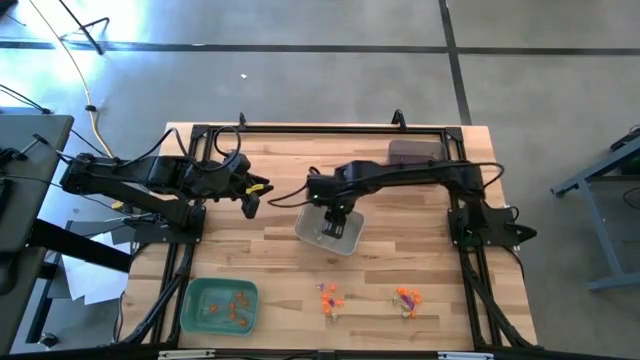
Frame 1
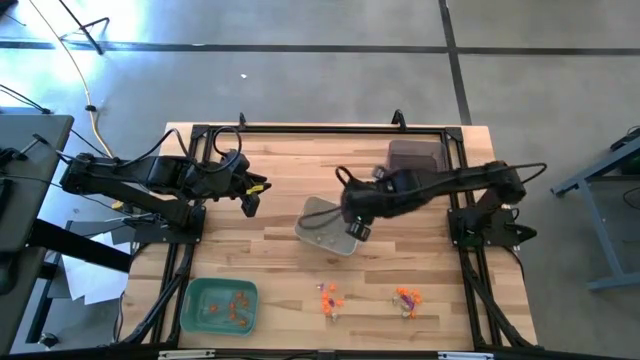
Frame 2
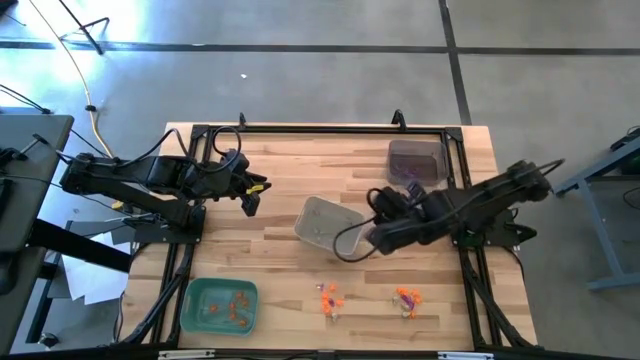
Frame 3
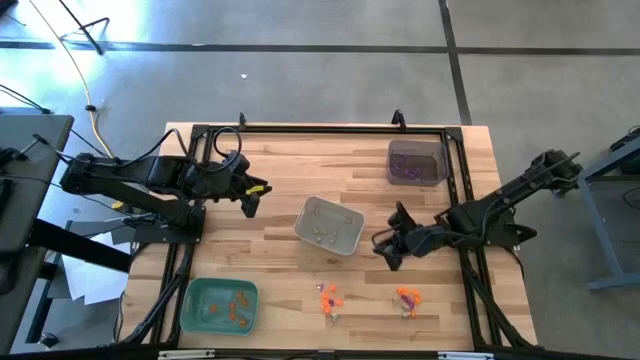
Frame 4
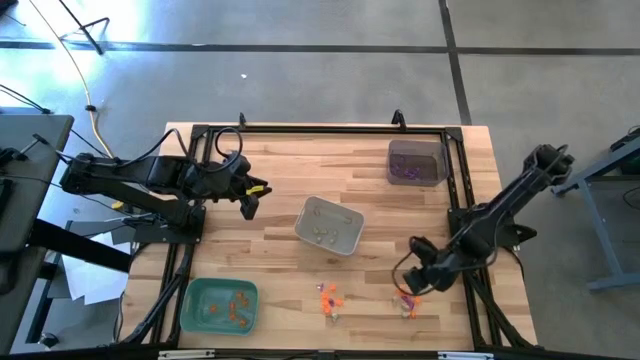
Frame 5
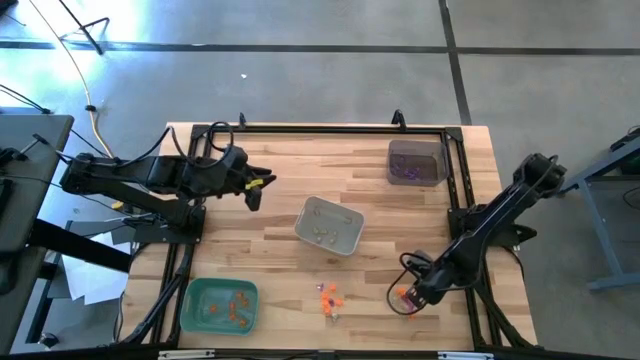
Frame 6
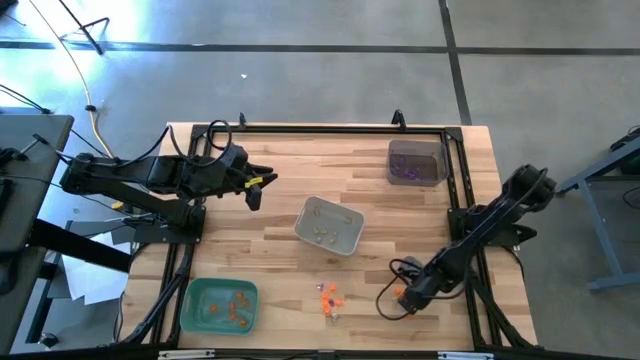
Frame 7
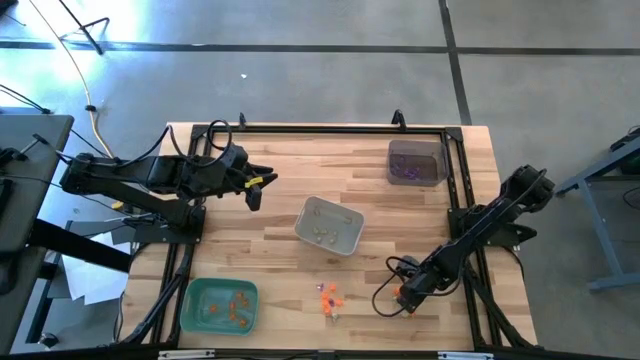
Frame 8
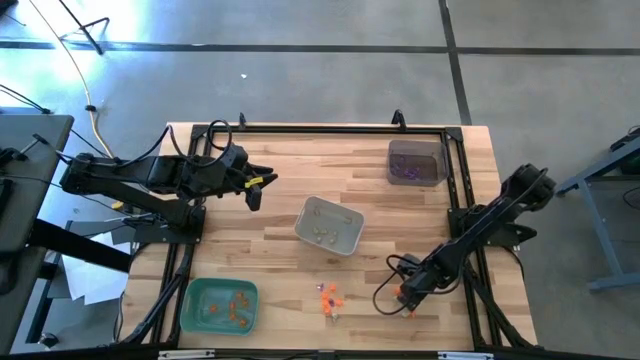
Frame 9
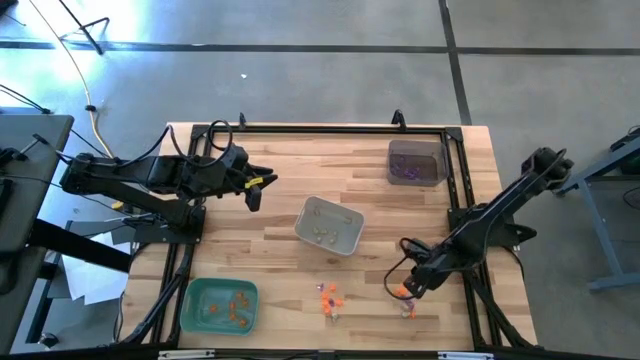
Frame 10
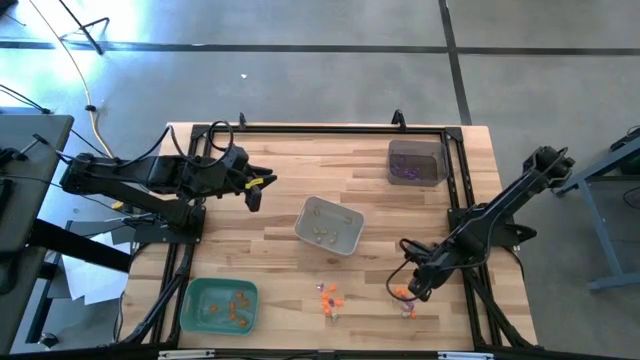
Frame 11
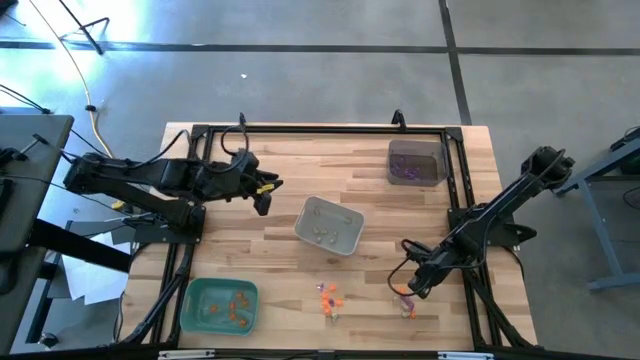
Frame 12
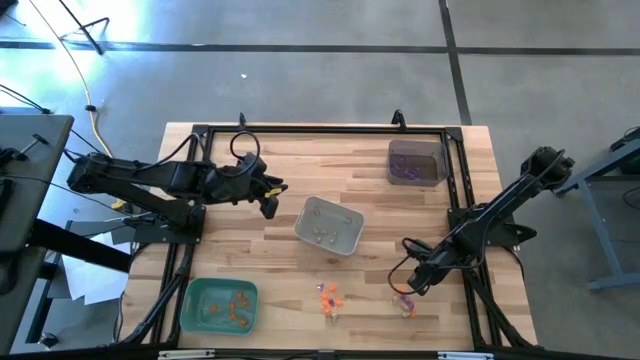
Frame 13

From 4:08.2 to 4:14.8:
Task: Sort Halloween decoration
Put the orange spider toy into the green bin

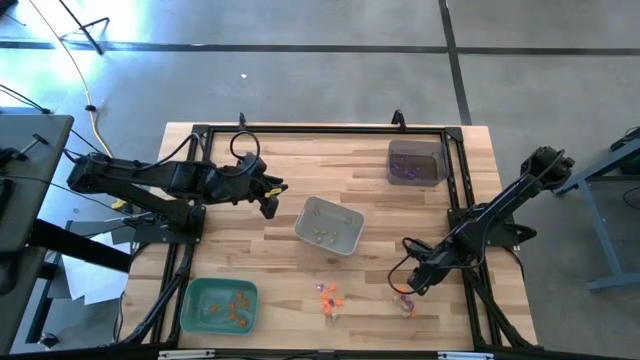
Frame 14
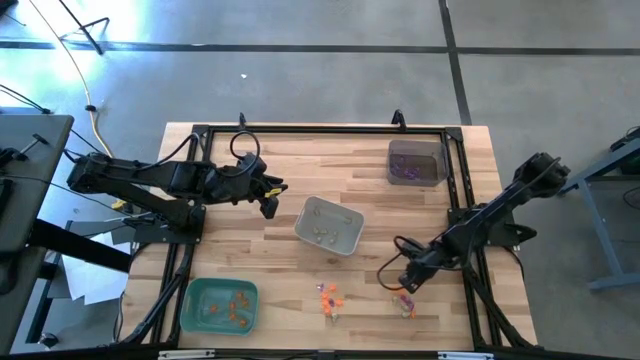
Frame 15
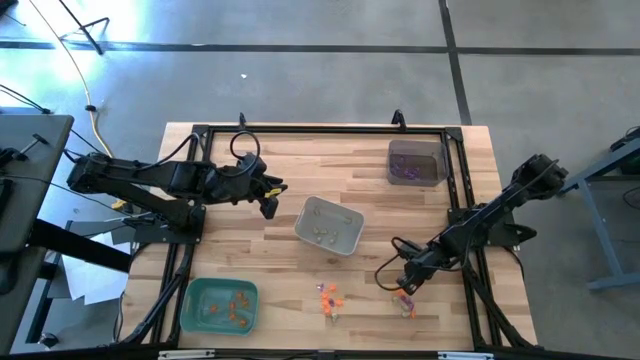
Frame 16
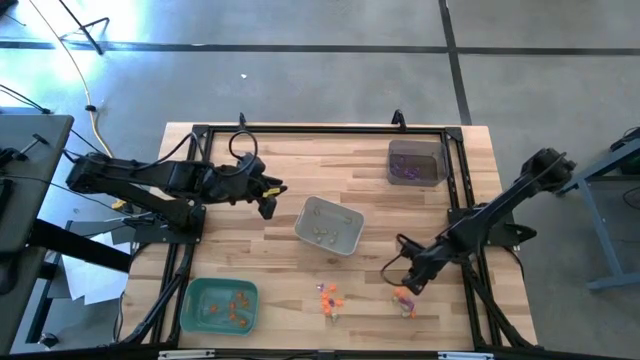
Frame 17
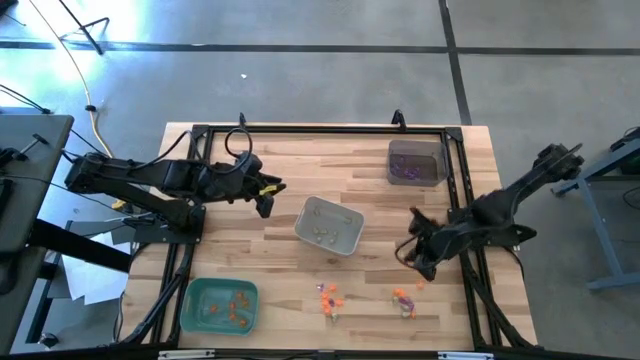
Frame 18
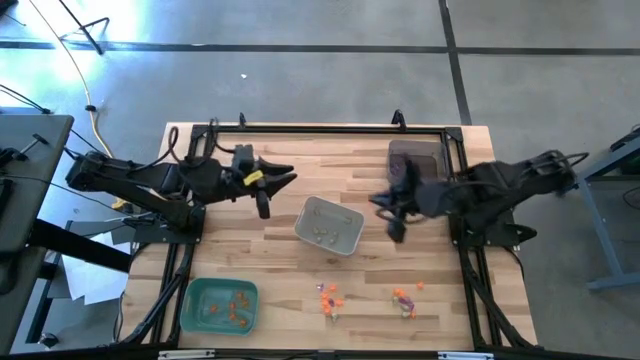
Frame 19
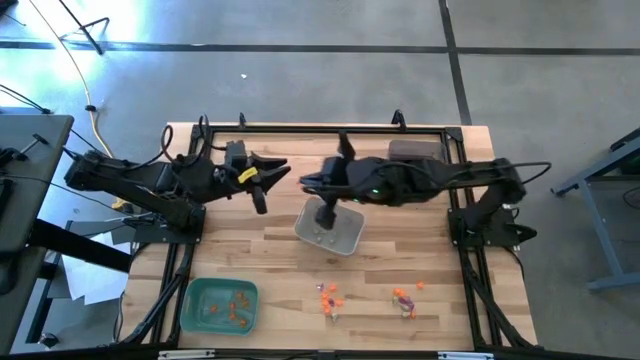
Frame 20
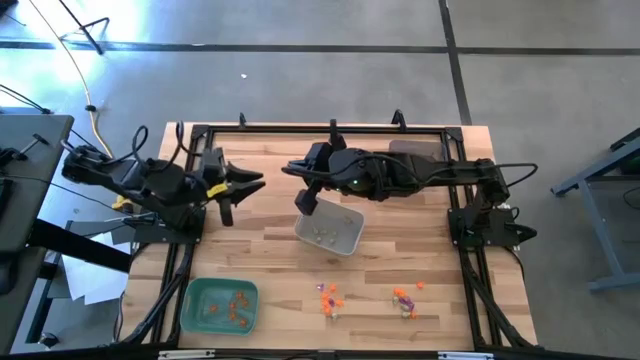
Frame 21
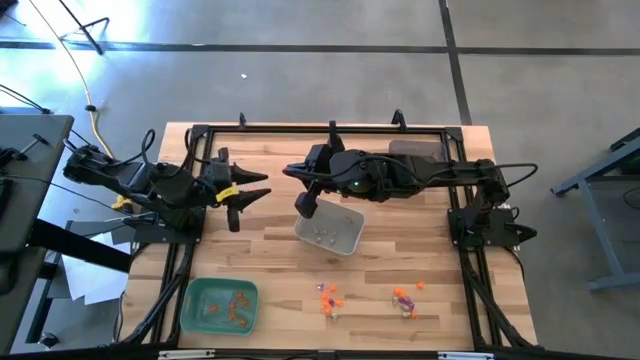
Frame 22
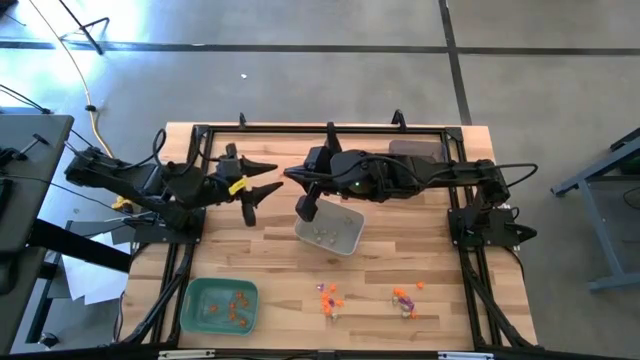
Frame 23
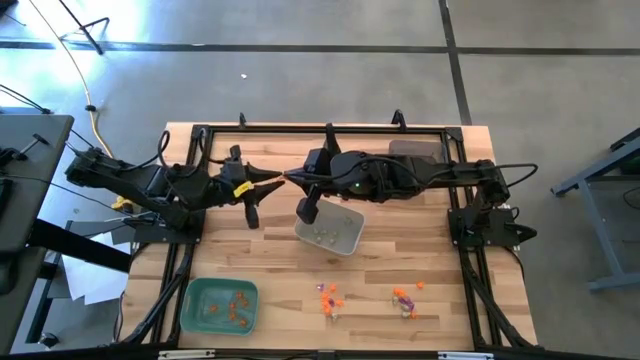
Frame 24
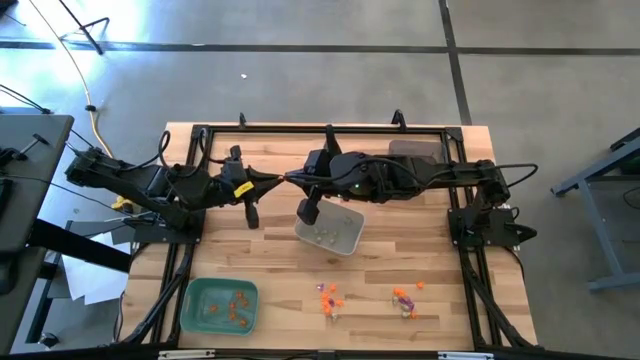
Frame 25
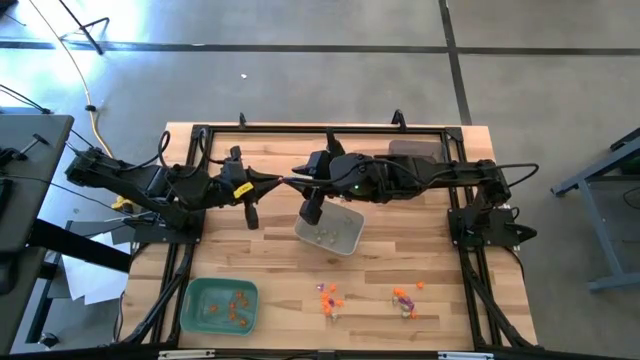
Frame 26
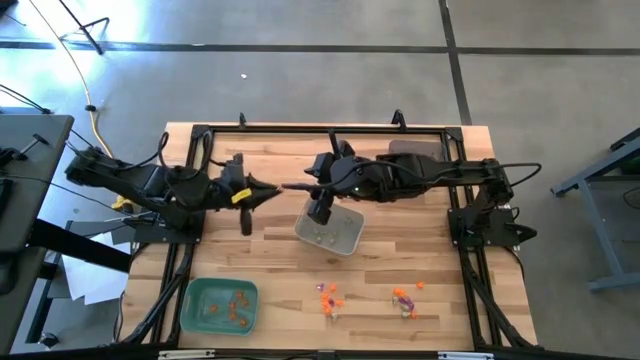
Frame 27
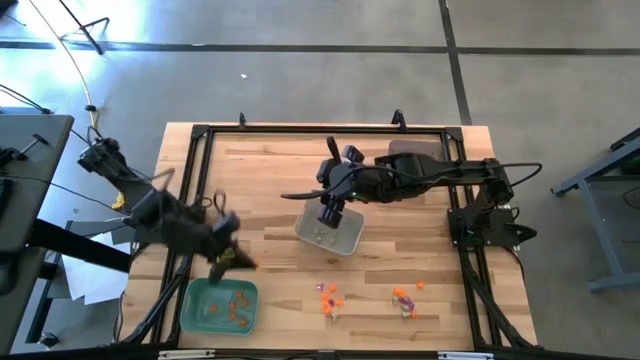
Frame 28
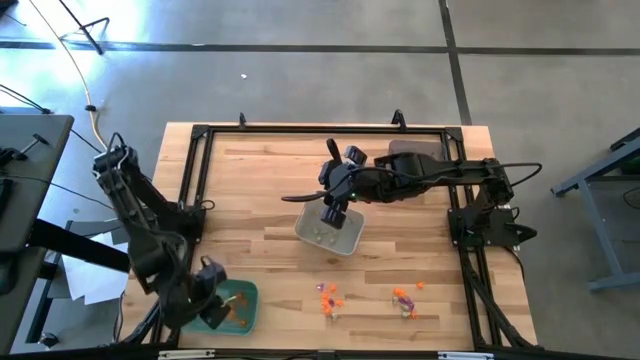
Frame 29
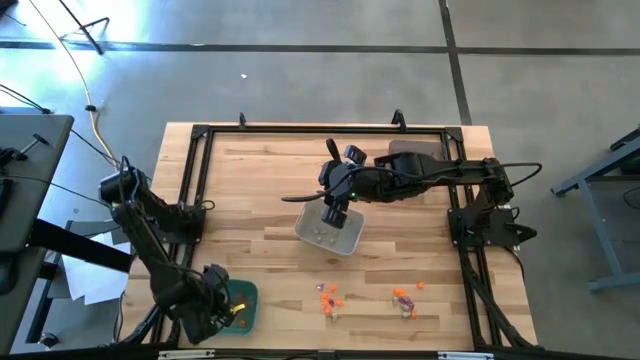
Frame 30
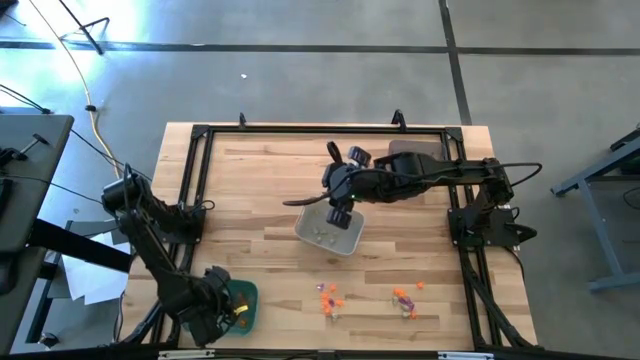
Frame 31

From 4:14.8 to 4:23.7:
Put the orange spider toy into the green bin

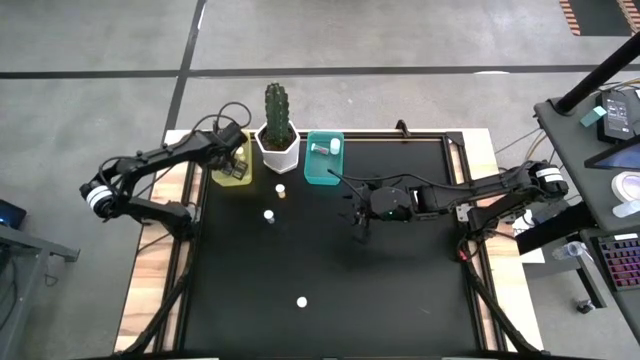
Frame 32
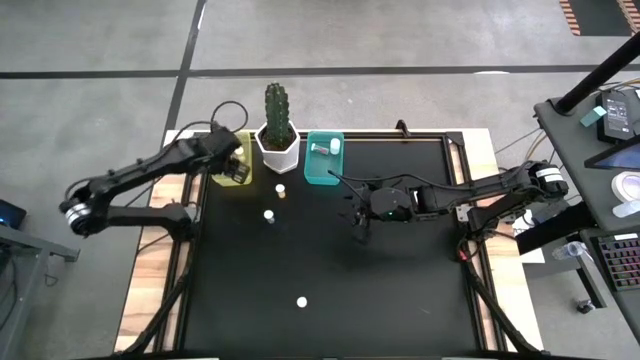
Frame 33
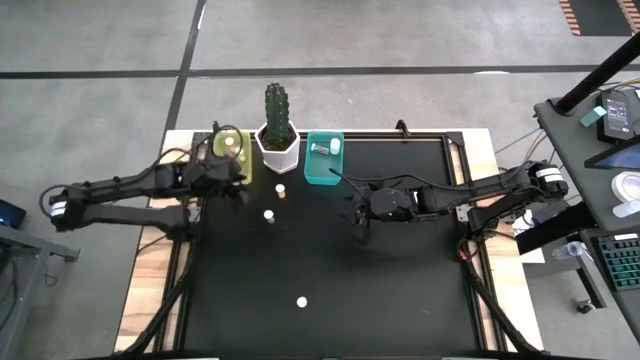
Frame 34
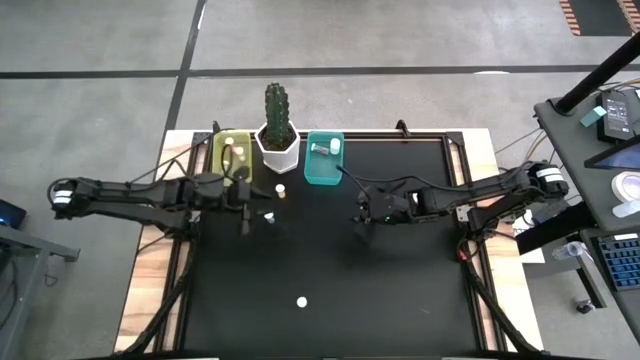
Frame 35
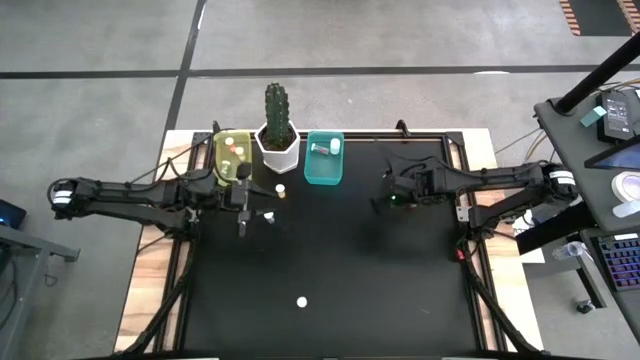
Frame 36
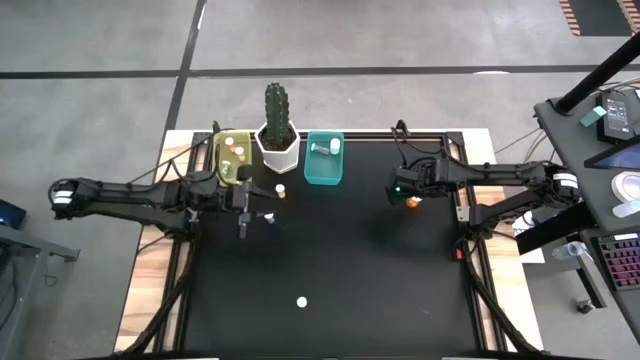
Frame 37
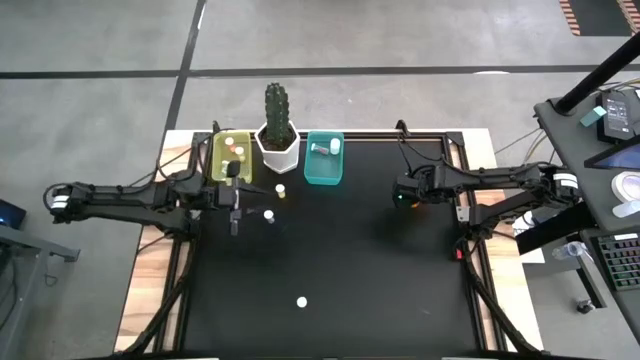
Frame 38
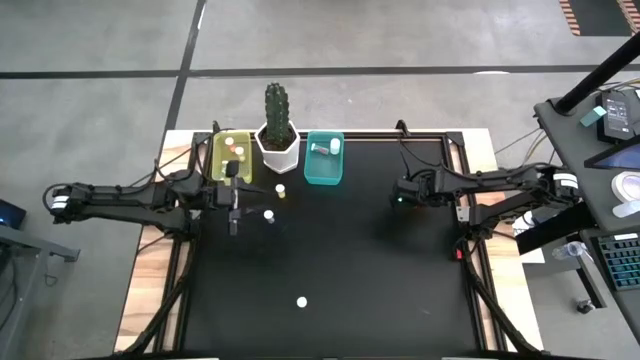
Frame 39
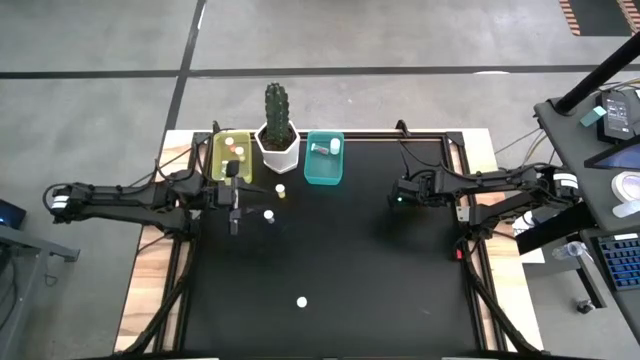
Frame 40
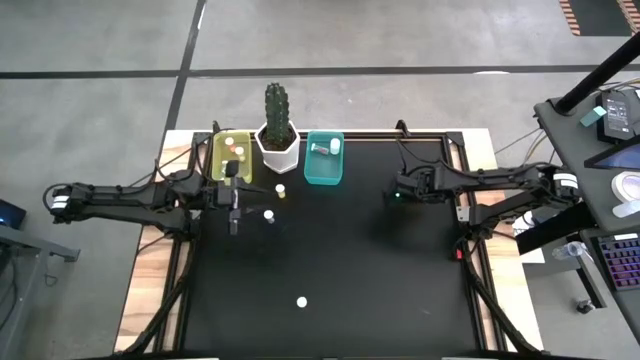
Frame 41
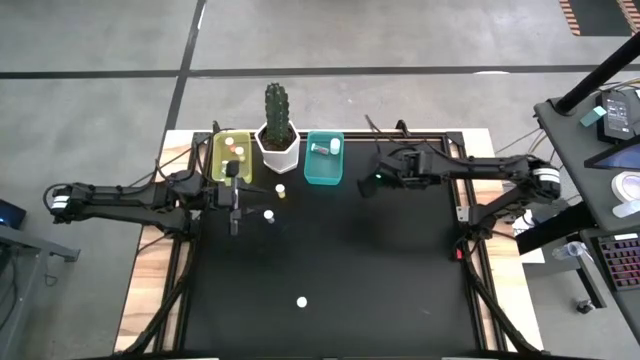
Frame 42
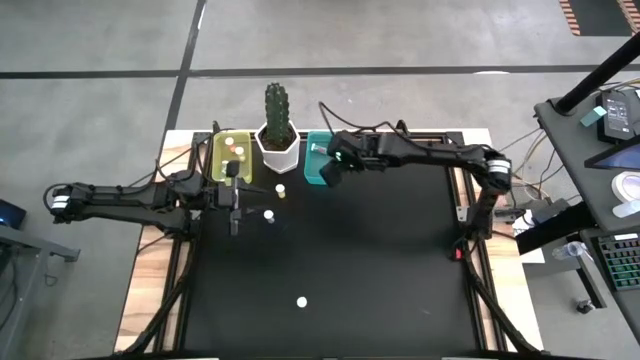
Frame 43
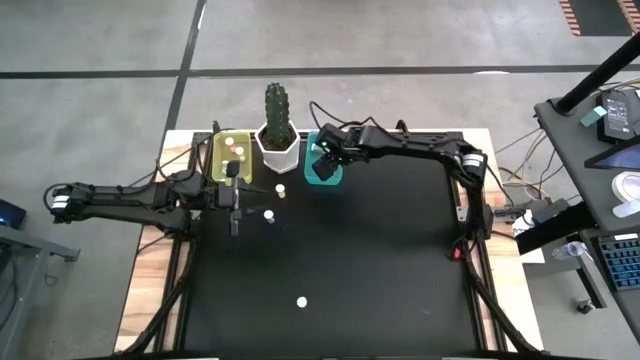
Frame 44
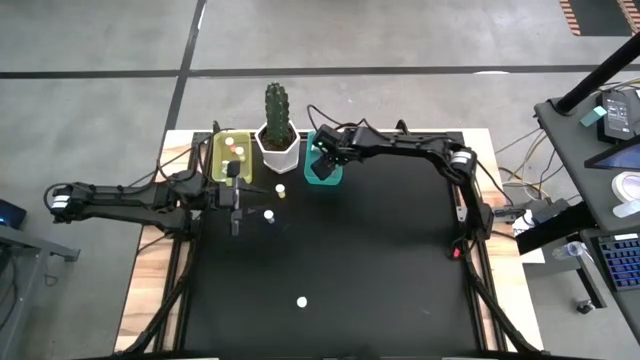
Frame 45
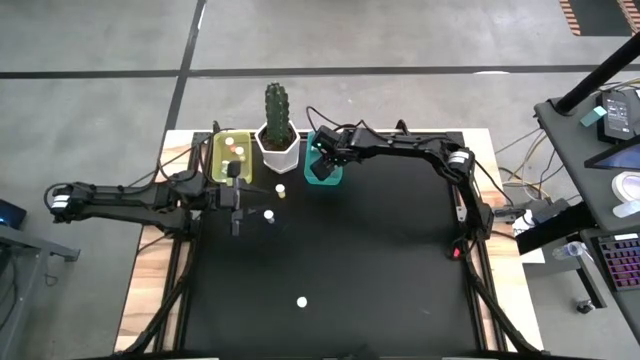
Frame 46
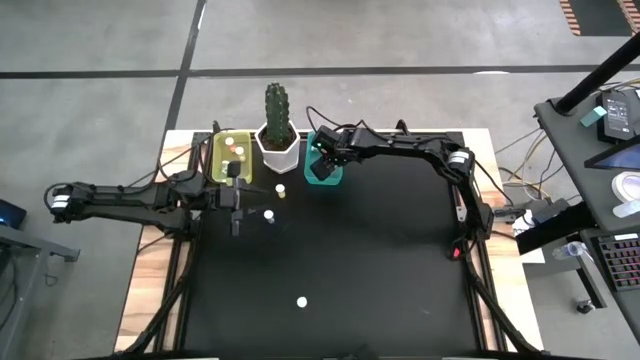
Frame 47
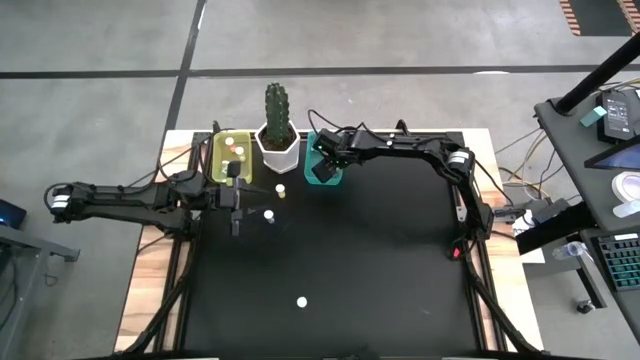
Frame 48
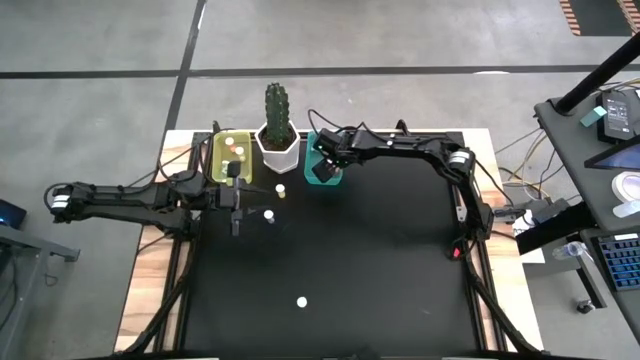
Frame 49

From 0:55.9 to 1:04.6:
Task: Pick and place medicine bottles into bin by pill shape (circle, oval)
Put the big orange capsule bottle into the blue bin
